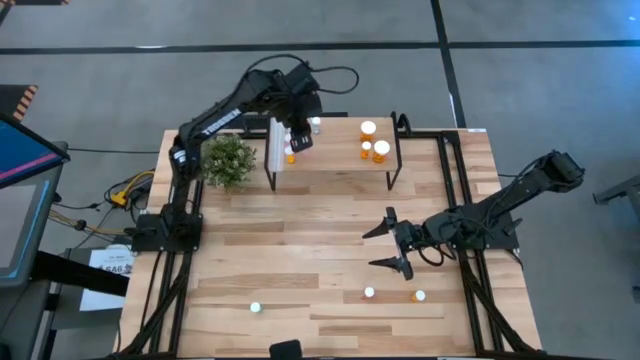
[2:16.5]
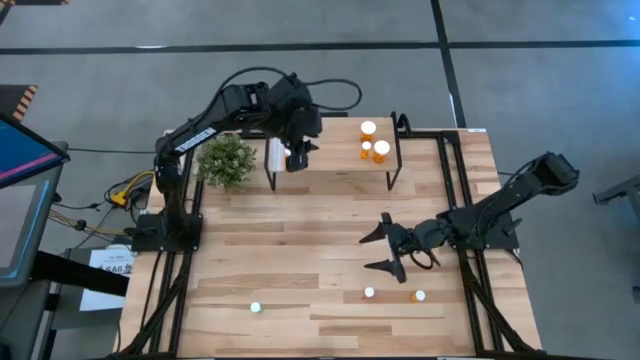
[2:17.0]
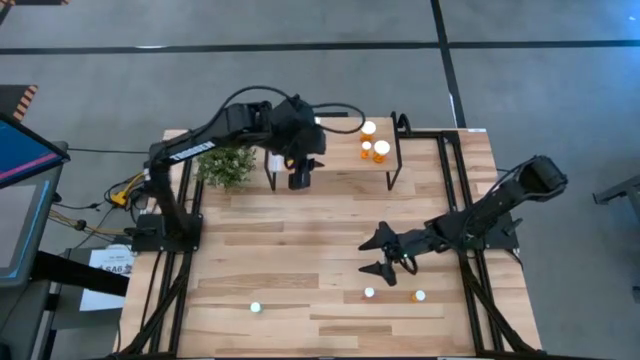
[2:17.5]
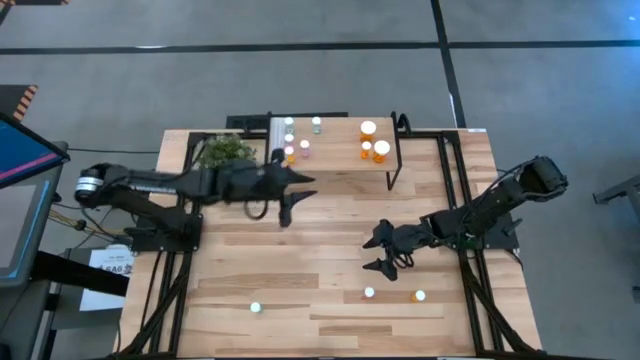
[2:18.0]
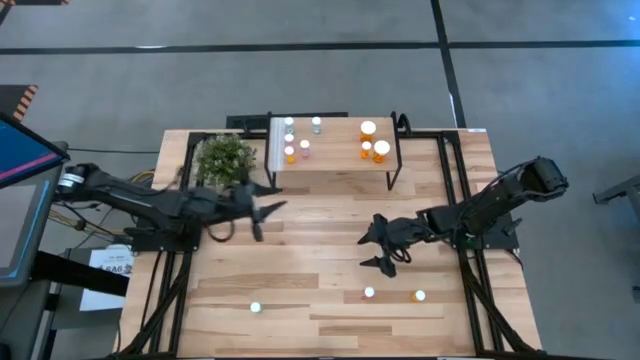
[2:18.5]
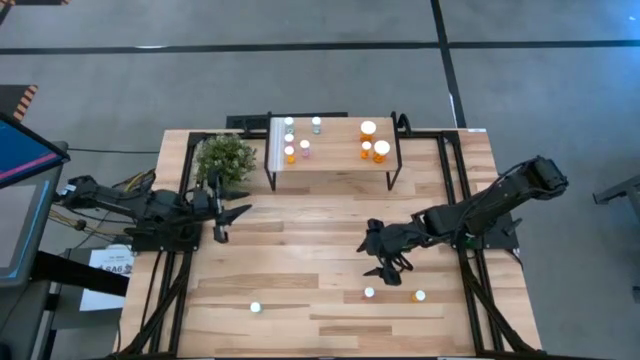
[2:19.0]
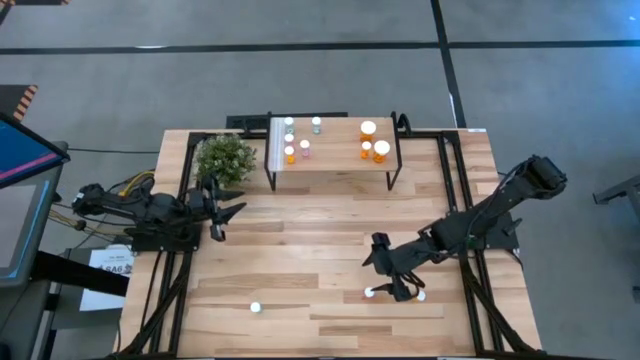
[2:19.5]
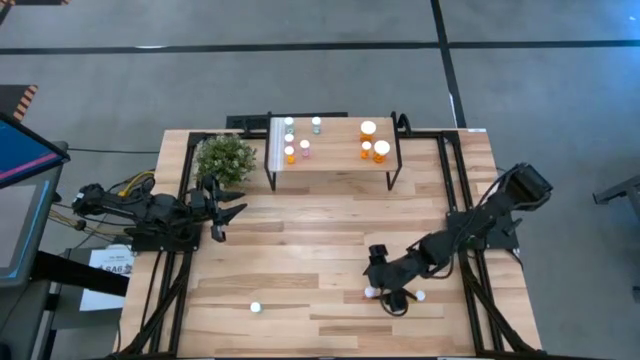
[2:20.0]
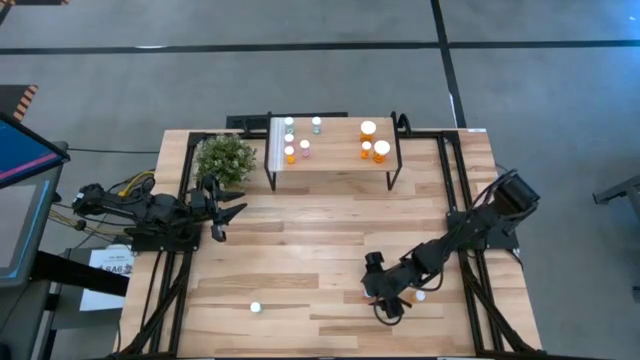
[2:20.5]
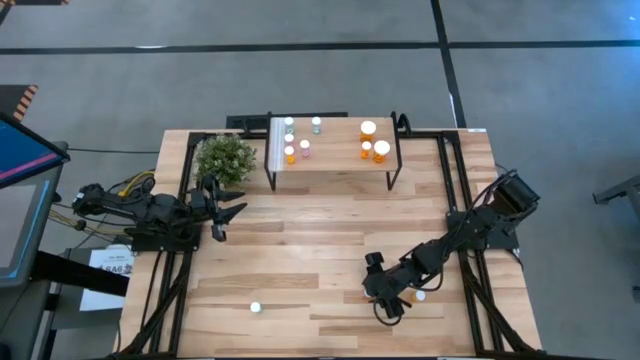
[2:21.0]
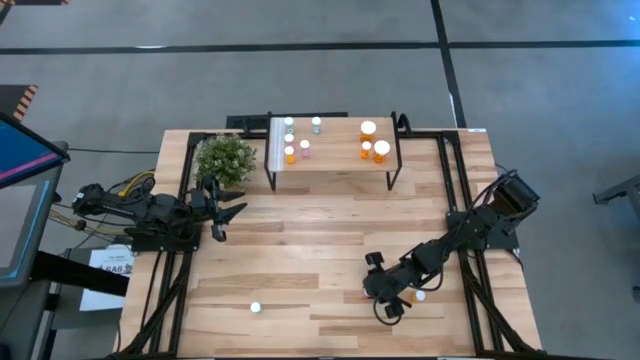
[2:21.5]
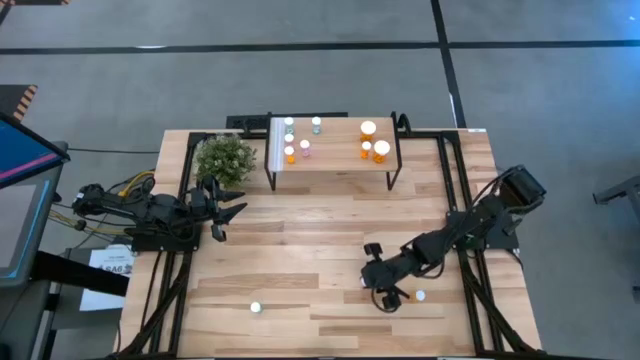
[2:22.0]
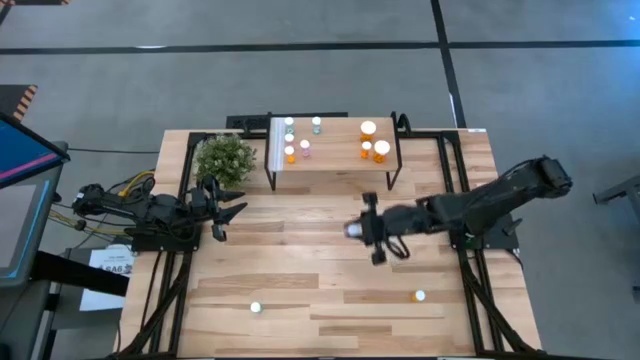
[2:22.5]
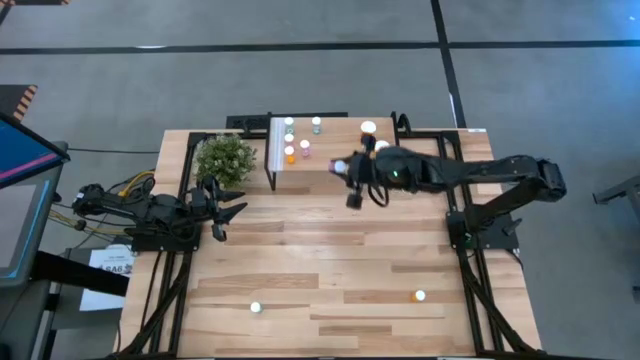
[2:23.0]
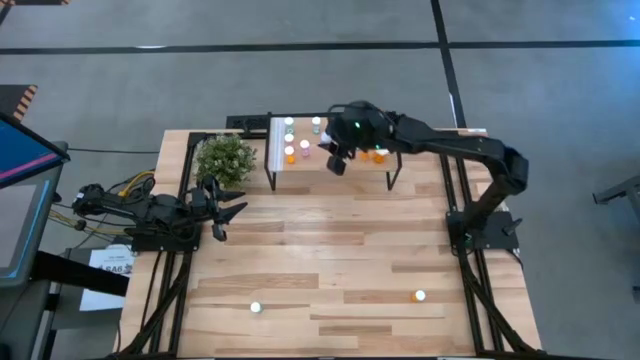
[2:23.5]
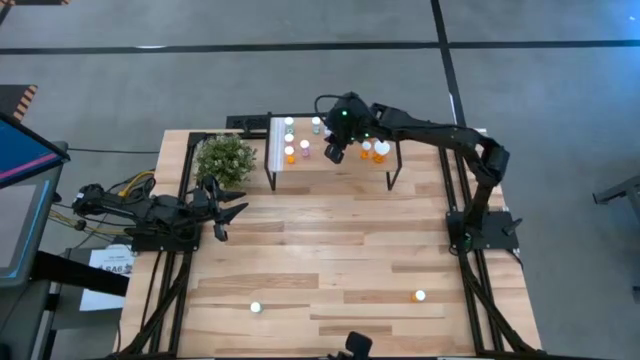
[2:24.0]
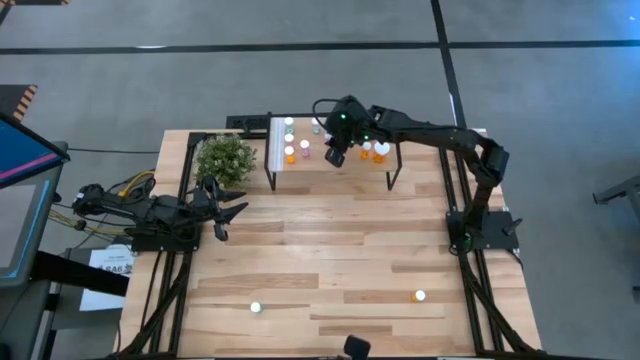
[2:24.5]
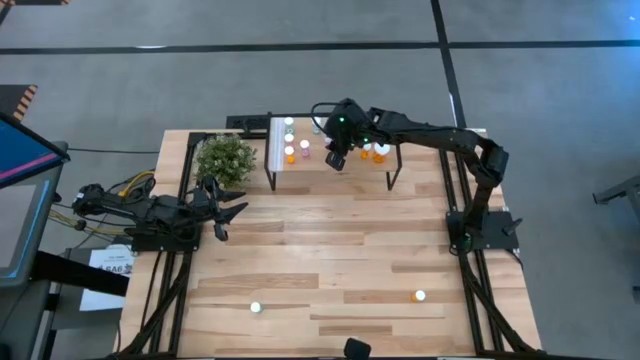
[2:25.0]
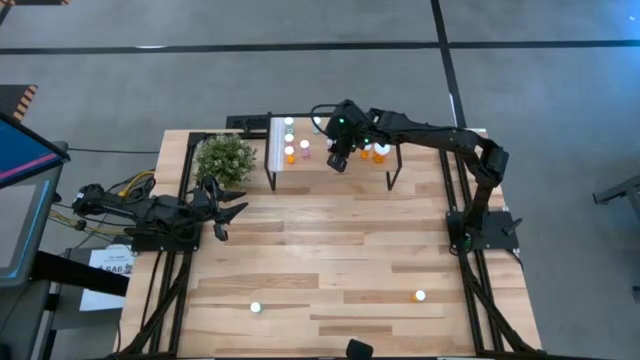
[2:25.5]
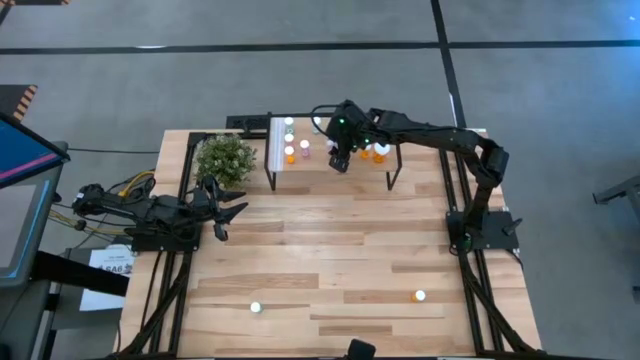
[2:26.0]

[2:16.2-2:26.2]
Task: Pick and place medicine bottles onto shelf by color
Put the pink small pill bottle on the shelf

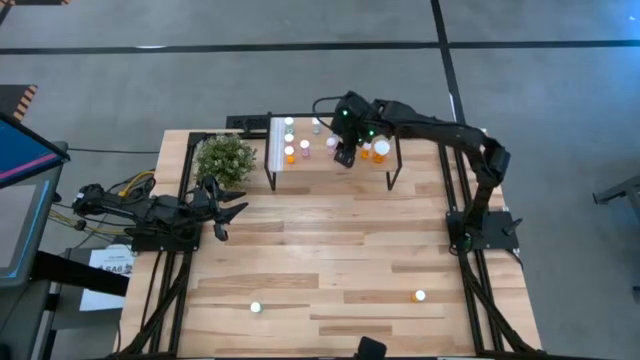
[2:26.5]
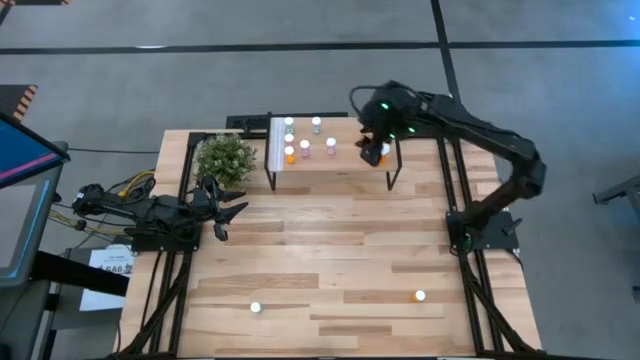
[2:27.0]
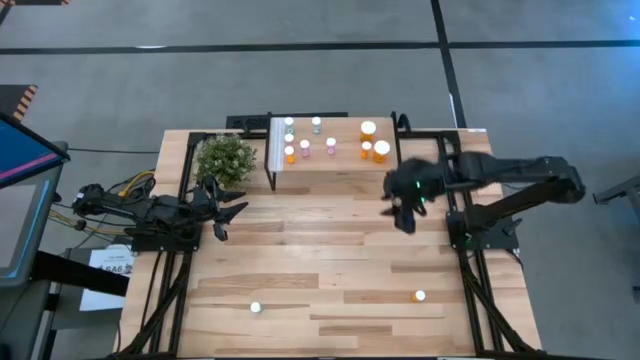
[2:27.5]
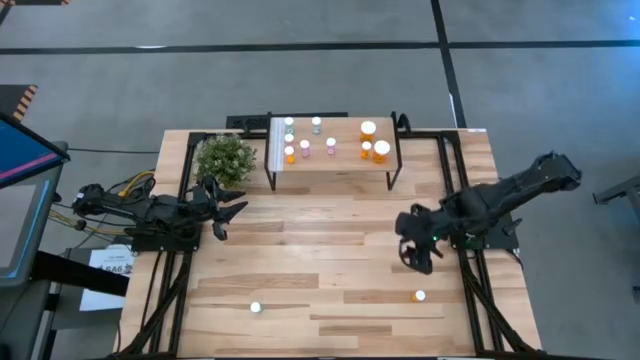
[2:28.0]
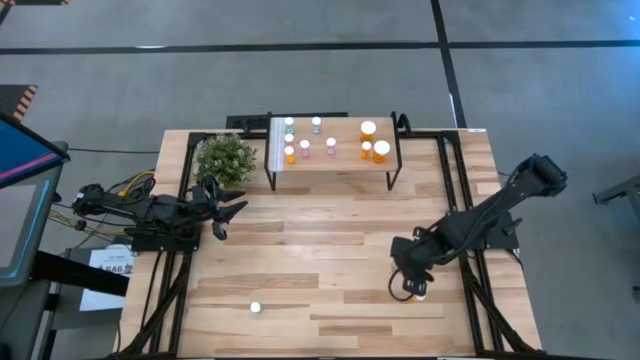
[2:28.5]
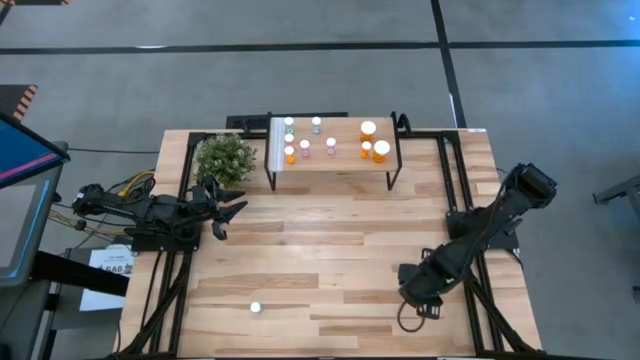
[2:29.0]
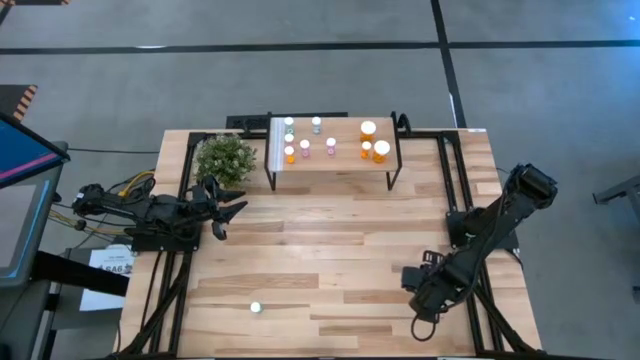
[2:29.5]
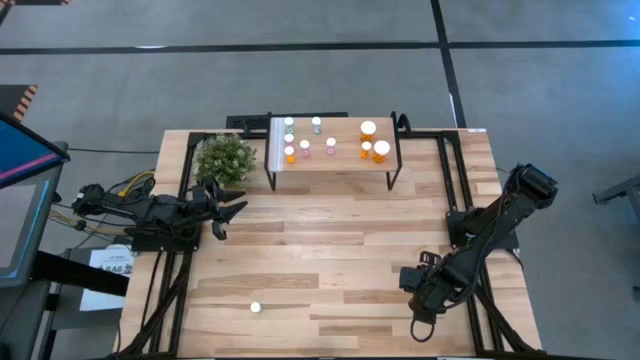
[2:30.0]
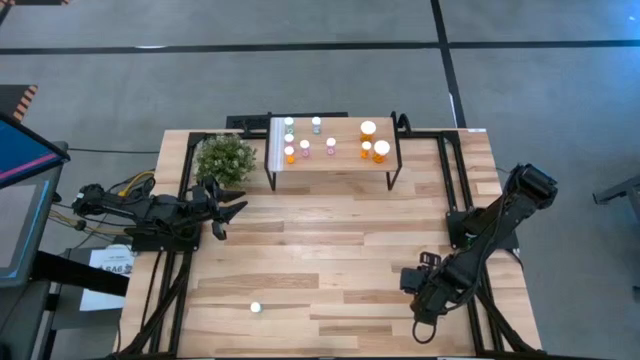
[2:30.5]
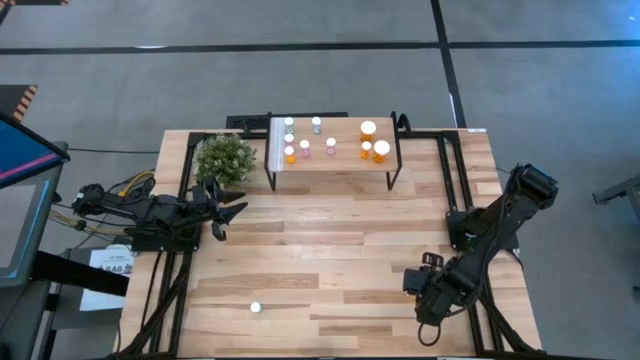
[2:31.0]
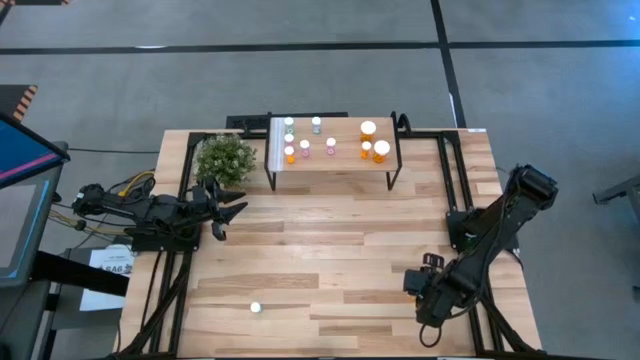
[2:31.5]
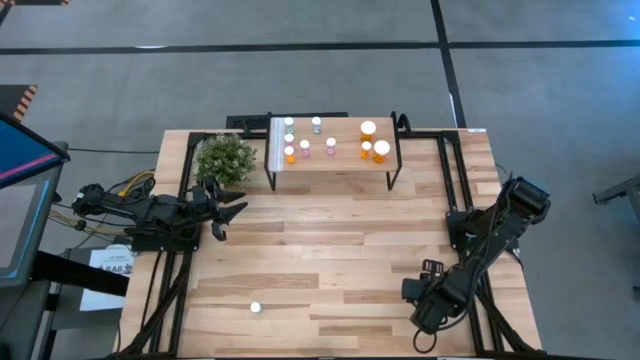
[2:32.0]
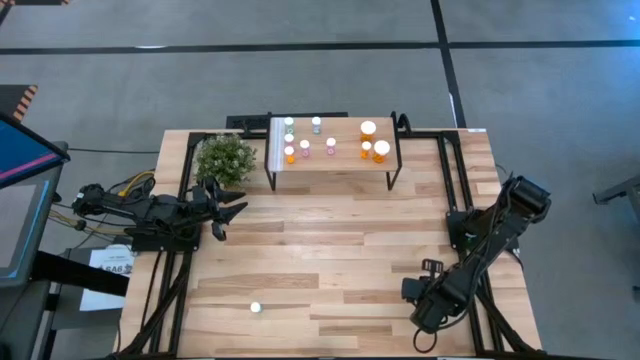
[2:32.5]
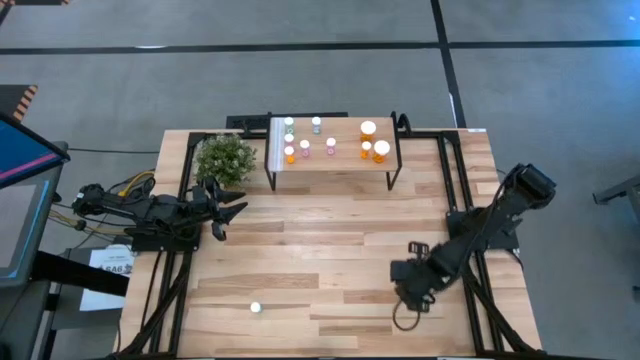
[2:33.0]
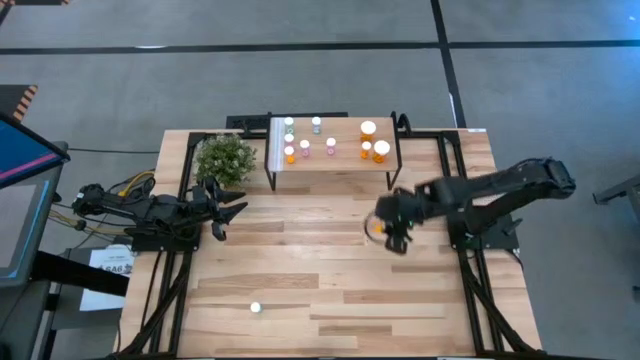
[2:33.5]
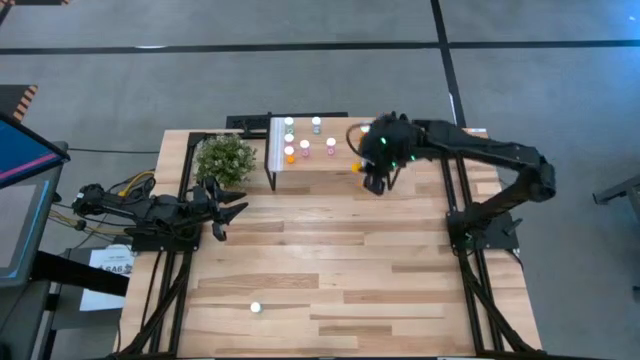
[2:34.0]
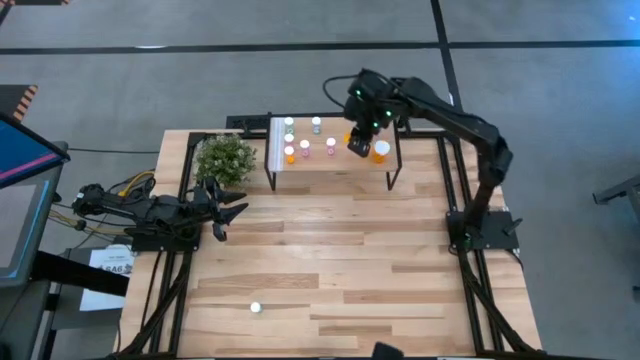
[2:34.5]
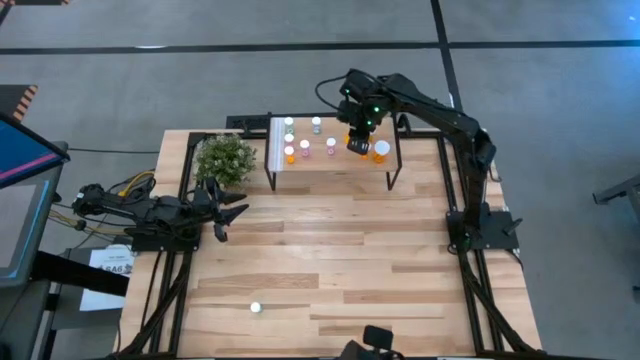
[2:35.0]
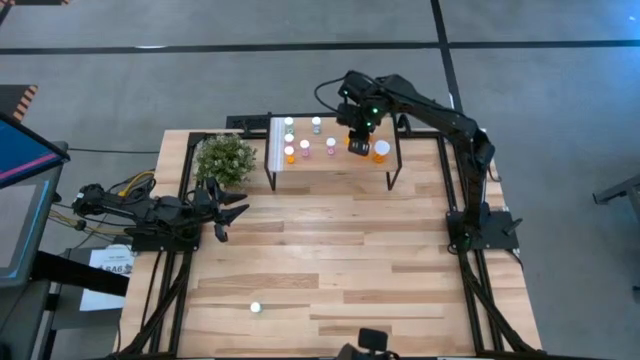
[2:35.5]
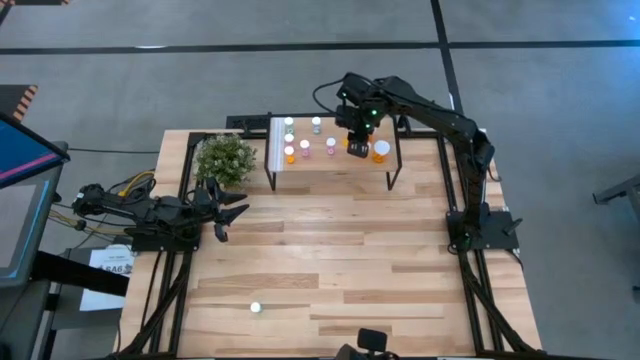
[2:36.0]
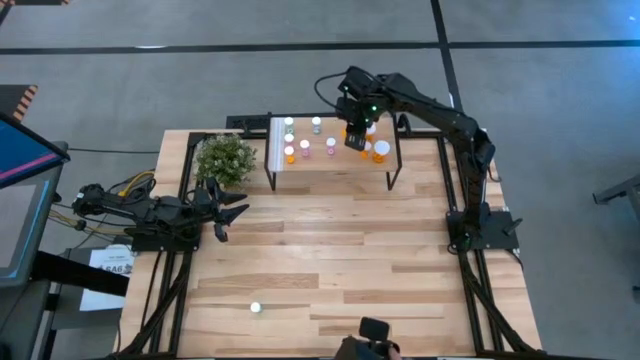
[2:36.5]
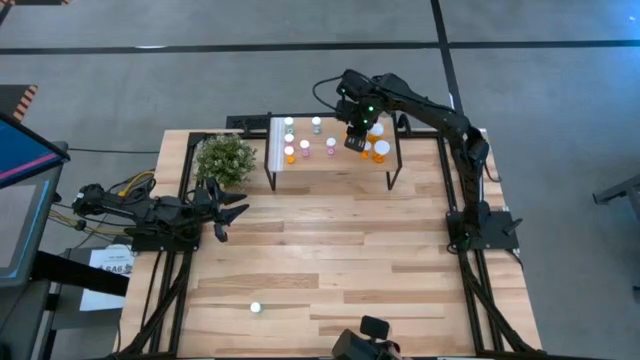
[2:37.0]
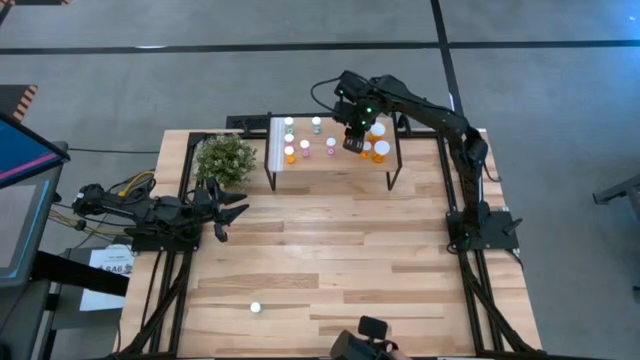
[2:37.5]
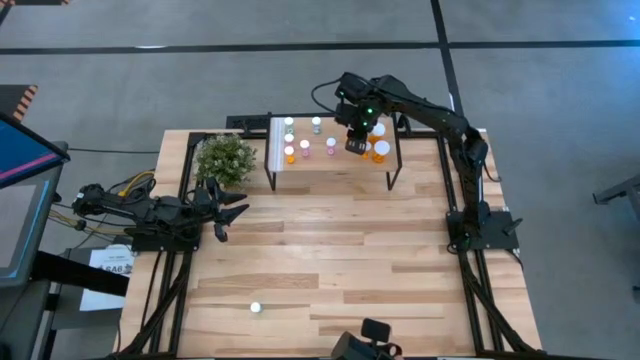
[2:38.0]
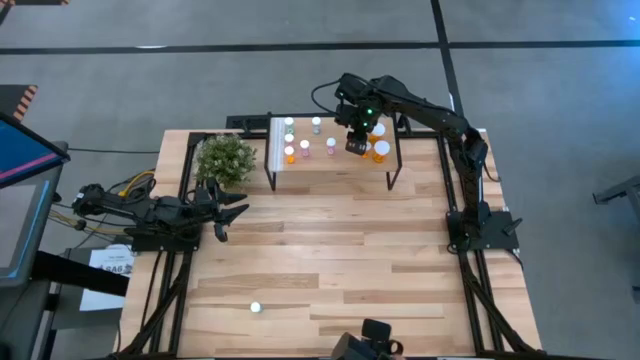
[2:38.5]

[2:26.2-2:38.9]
Put the orange small pill bottle on the shelf
